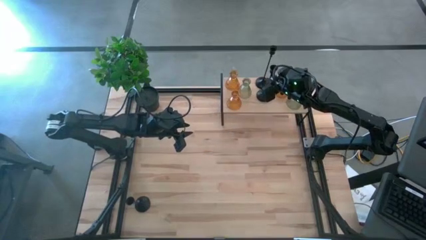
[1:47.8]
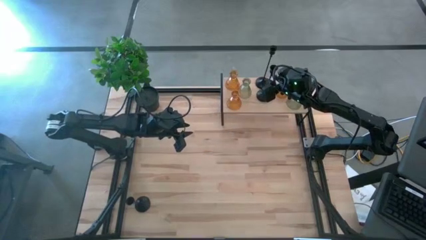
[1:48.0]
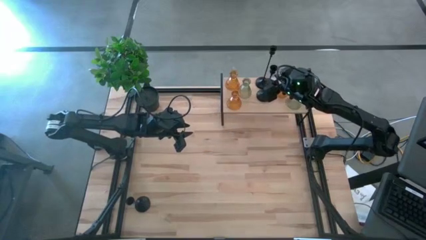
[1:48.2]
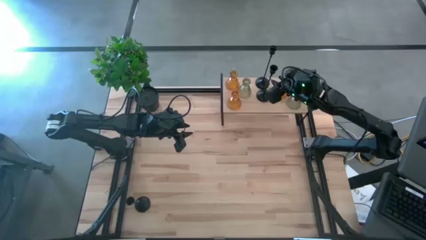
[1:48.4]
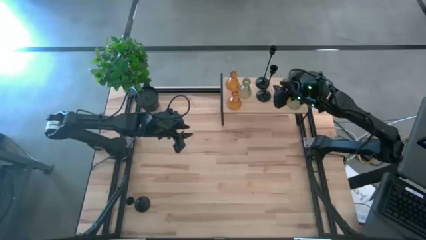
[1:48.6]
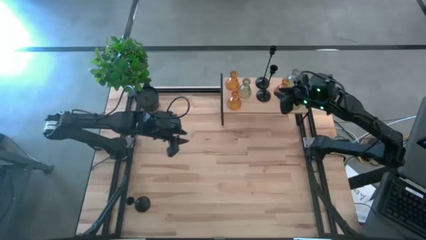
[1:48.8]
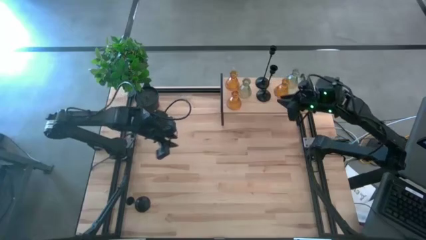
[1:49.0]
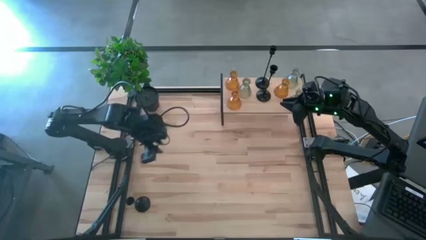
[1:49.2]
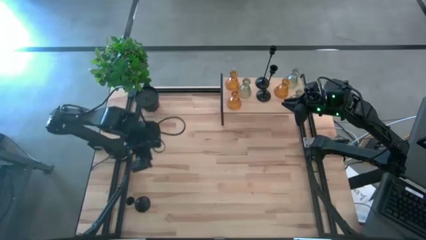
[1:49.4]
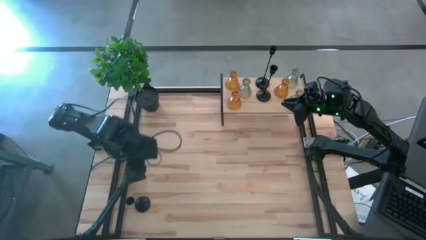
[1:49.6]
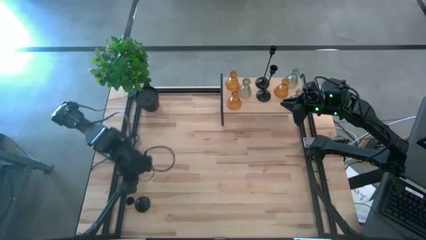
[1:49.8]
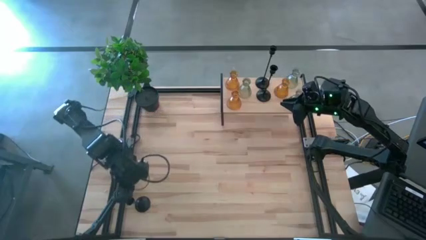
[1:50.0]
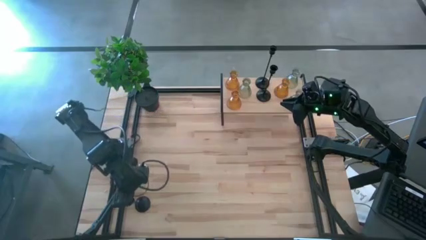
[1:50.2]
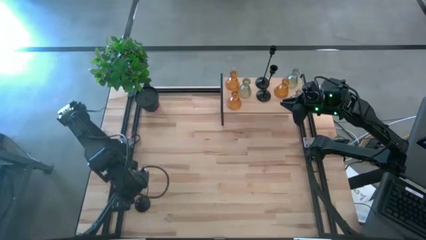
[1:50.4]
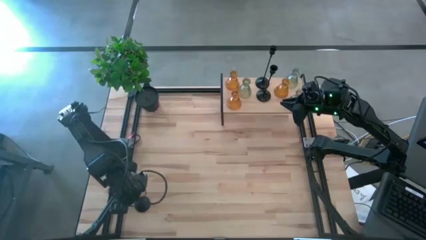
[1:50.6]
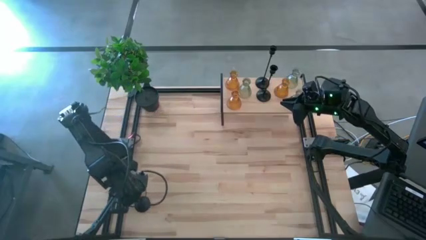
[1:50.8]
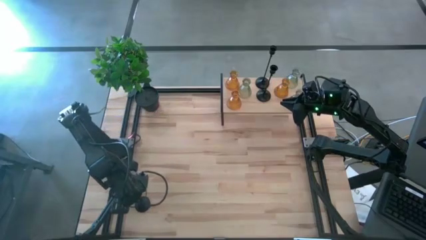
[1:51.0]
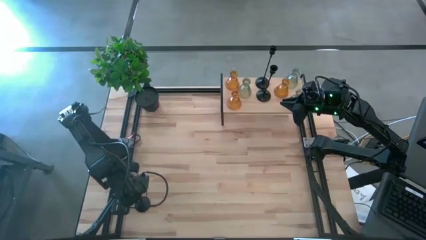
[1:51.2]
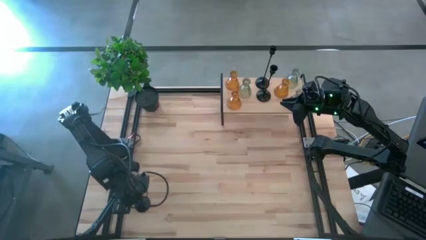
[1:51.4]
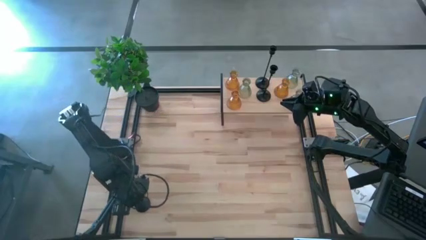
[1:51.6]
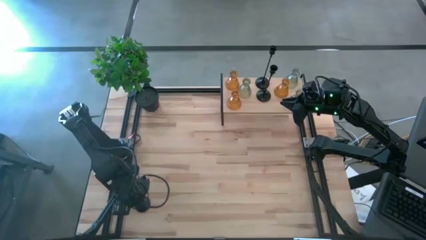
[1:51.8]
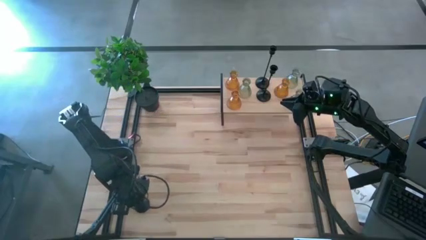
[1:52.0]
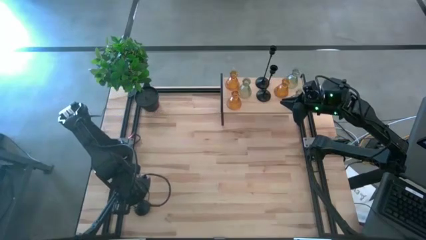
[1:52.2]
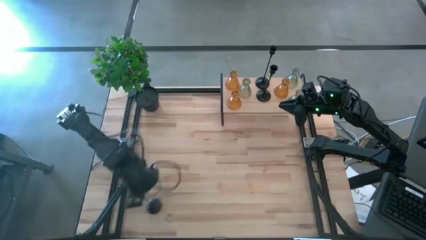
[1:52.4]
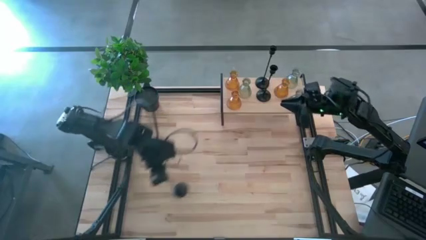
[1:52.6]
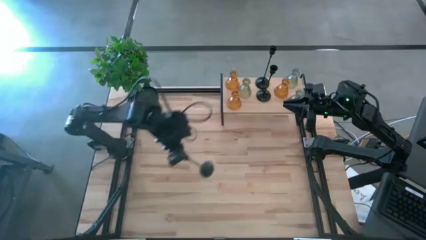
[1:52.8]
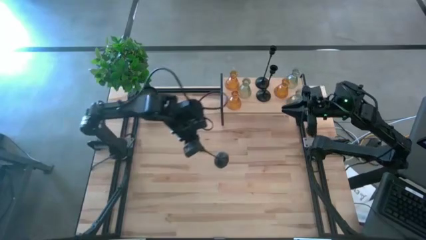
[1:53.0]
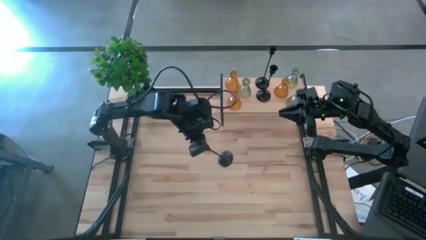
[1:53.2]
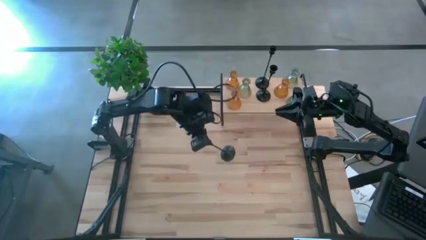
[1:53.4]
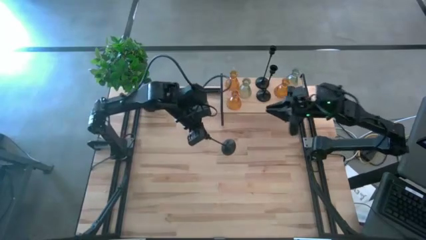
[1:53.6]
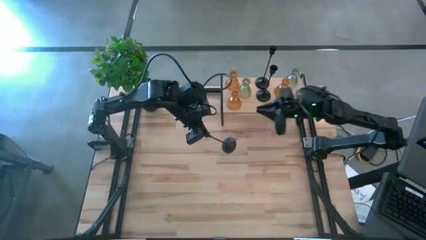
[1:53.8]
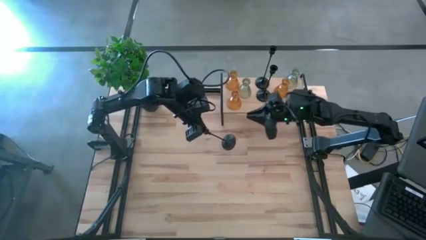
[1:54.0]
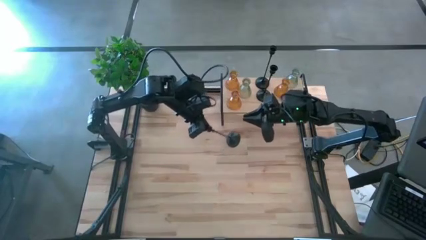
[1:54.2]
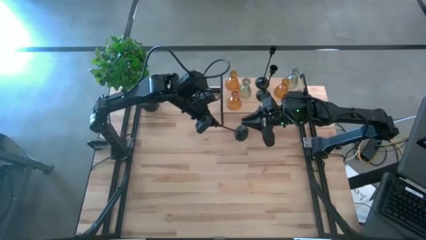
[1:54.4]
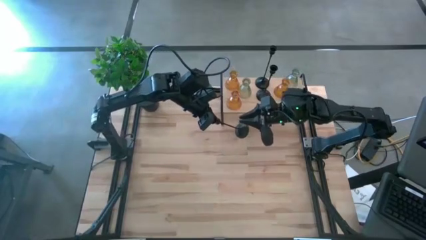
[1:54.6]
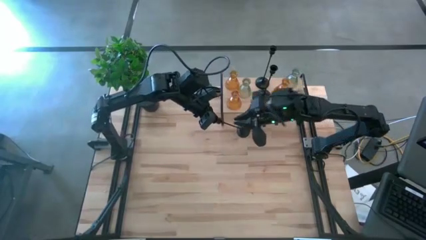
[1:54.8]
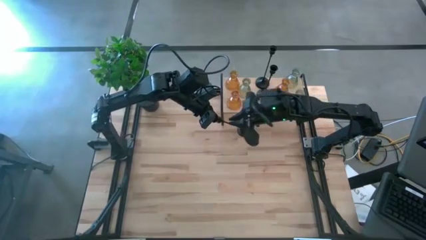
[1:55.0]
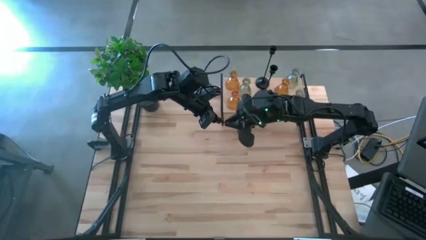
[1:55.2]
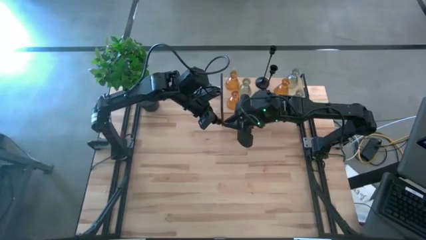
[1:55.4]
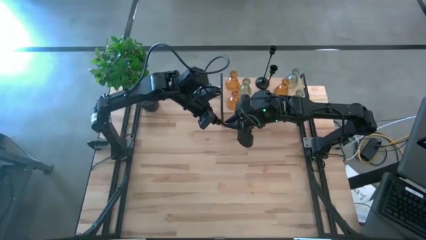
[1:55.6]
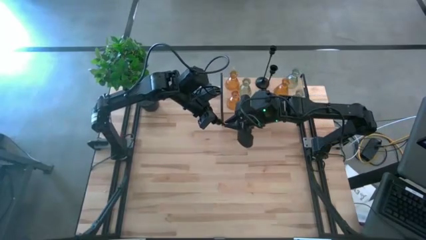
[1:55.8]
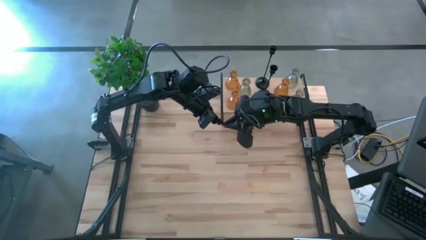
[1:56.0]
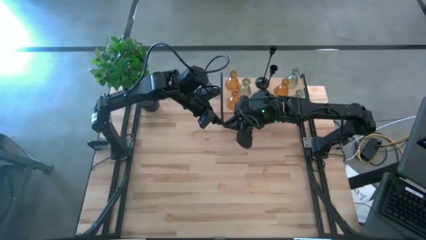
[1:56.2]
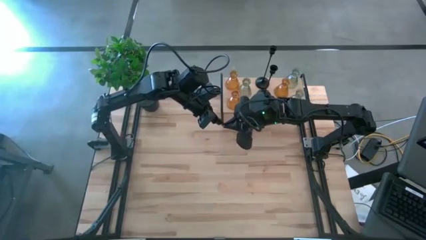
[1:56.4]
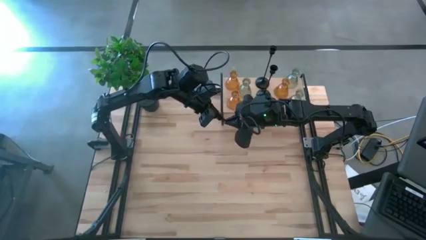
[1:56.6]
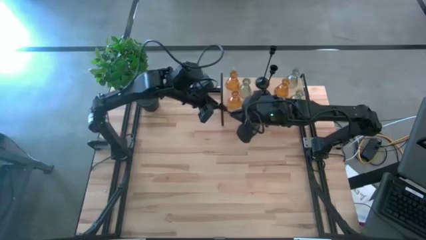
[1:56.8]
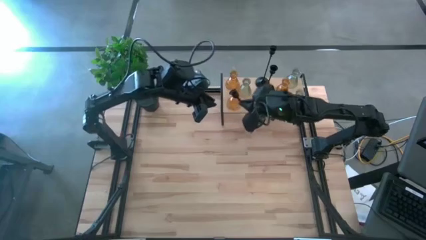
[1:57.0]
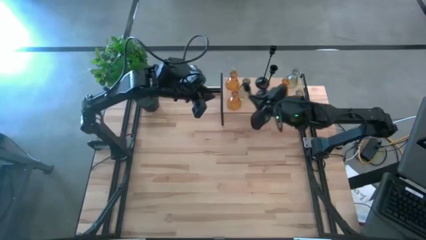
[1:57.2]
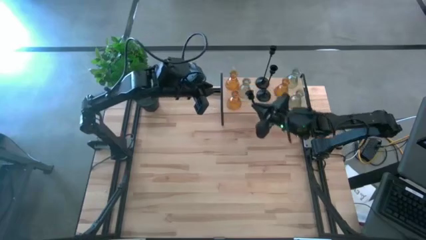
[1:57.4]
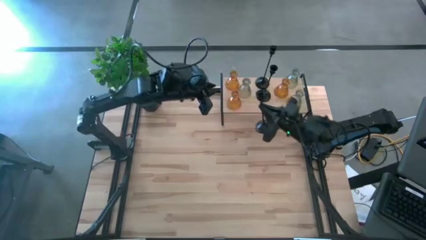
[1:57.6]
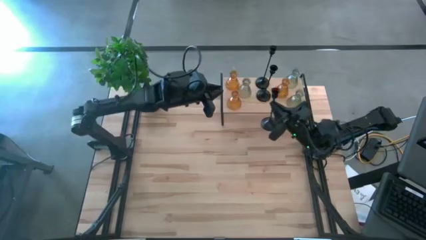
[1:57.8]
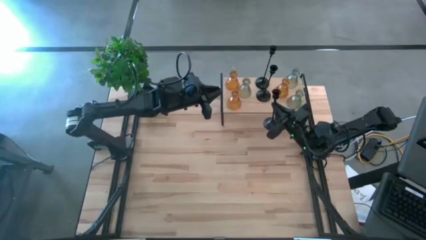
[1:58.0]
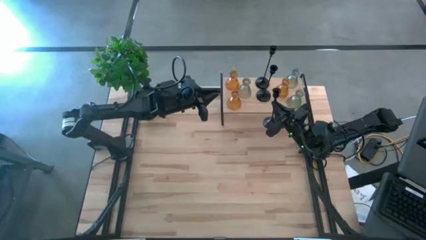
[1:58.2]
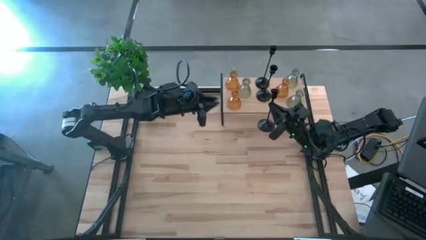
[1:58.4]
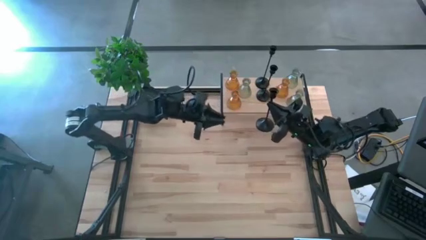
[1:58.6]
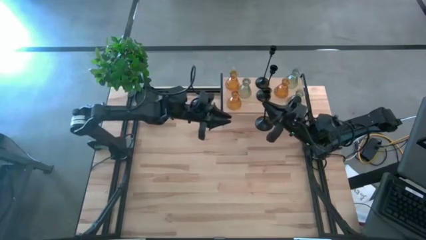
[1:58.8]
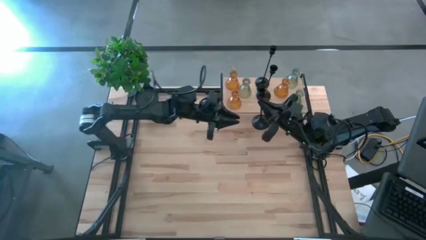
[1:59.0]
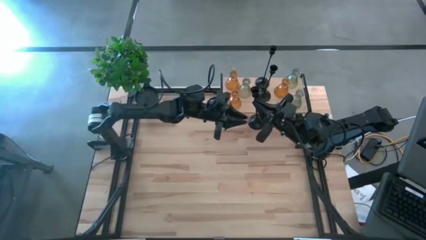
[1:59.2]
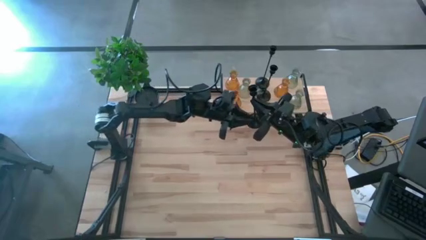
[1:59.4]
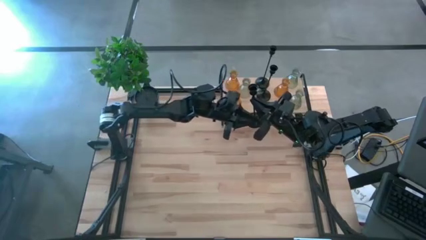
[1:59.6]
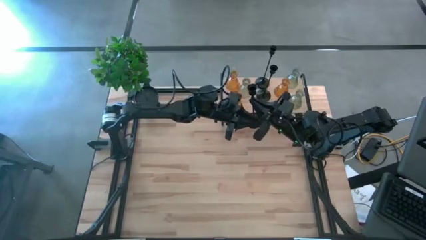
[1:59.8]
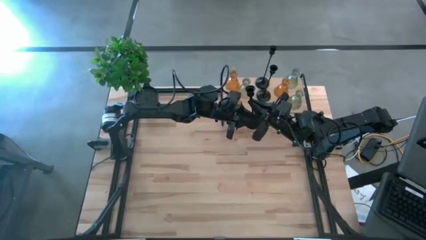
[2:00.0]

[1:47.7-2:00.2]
Task: Pick & Place candle stick holders
Put the black candle holder on the shelf

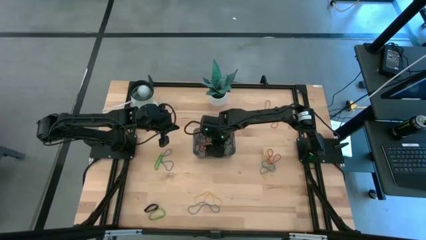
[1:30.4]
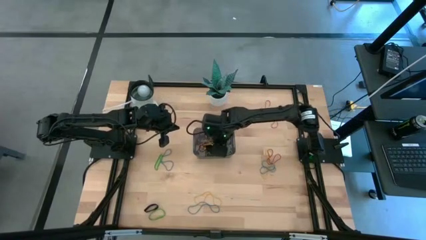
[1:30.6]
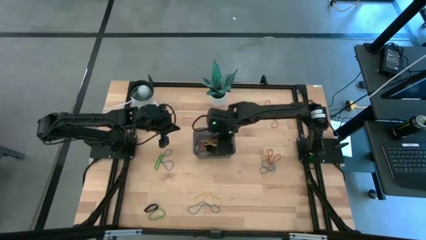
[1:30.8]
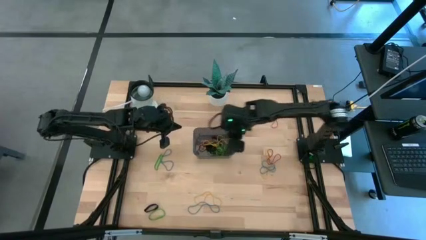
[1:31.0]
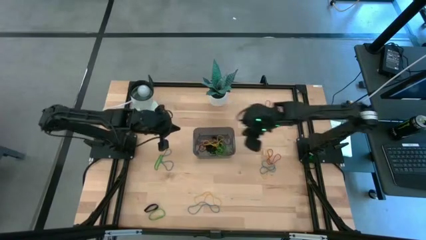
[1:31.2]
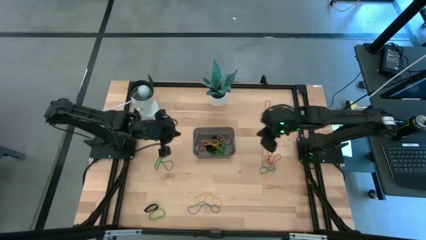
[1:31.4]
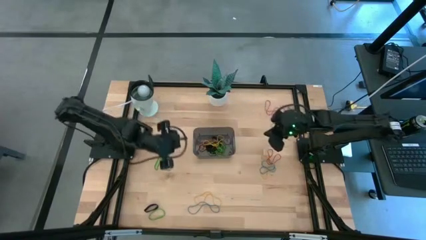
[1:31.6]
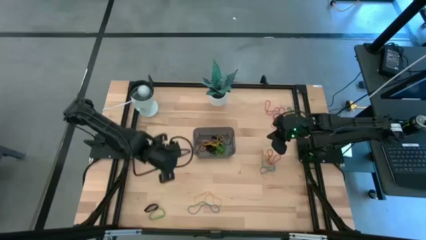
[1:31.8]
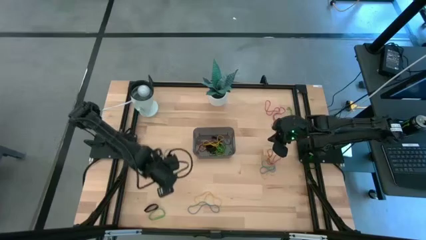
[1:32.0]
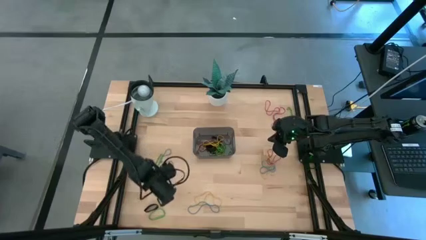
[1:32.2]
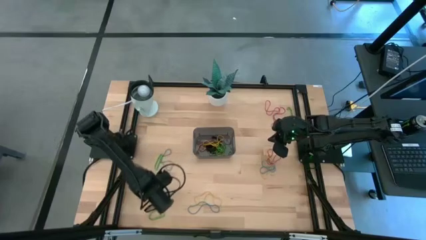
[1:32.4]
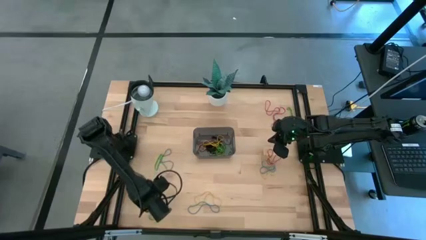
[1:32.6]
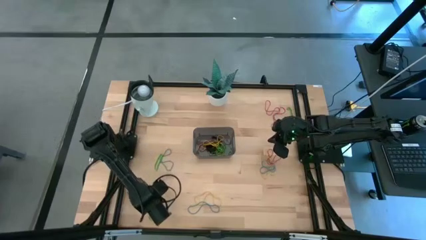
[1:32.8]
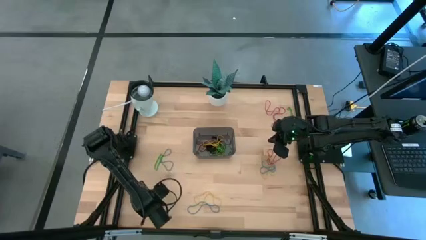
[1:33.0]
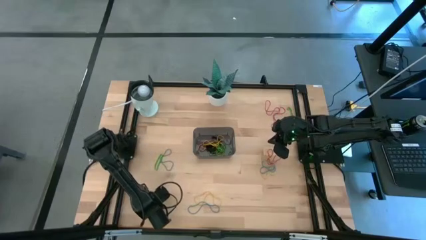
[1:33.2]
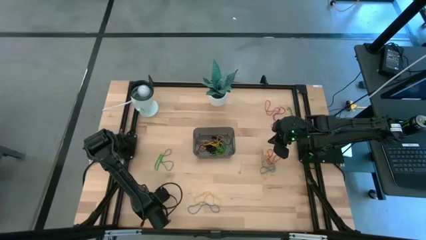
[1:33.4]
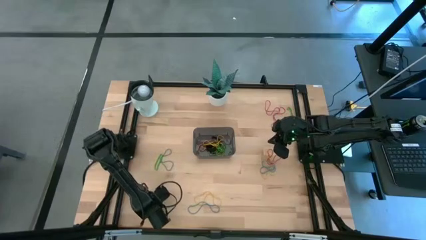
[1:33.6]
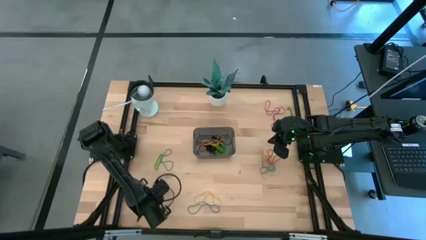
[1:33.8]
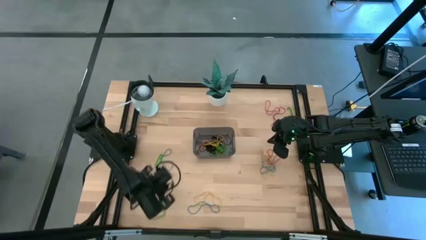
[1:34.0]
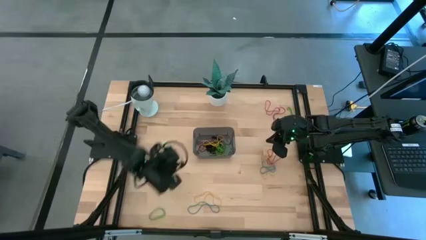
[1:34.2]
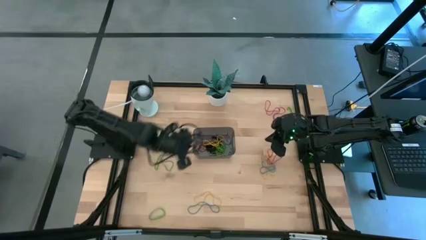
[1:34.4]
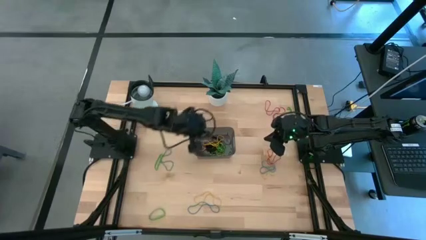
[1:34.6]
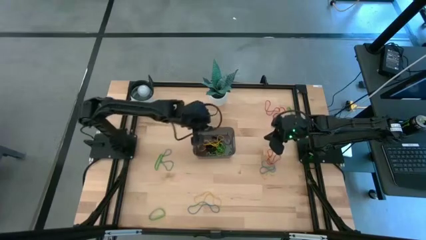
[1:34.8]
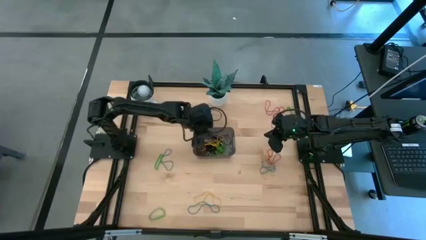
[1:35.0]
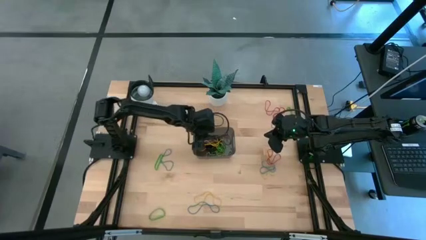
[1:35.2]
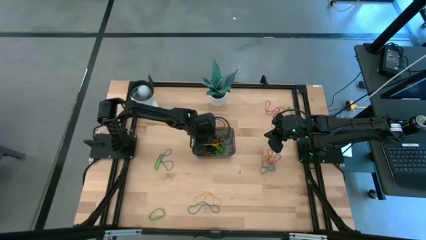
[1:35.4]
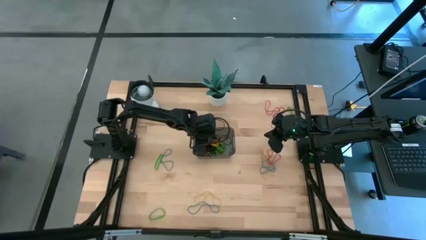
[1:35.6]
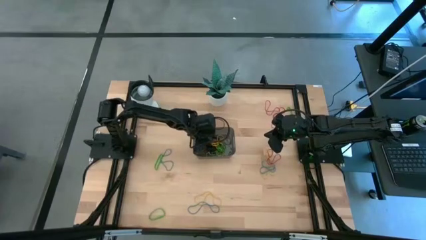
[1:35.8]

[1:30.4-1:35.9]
Task: Pick and place rubber bands into bin
Put the black rubber band into the black bin
